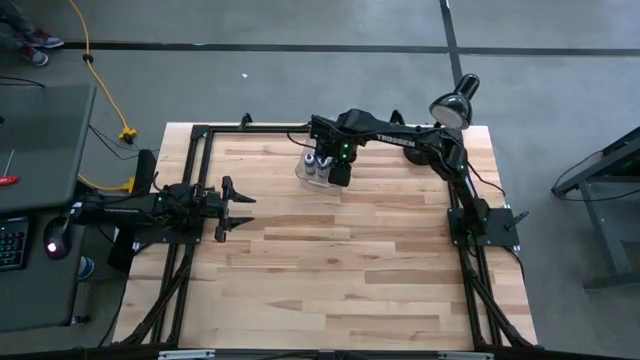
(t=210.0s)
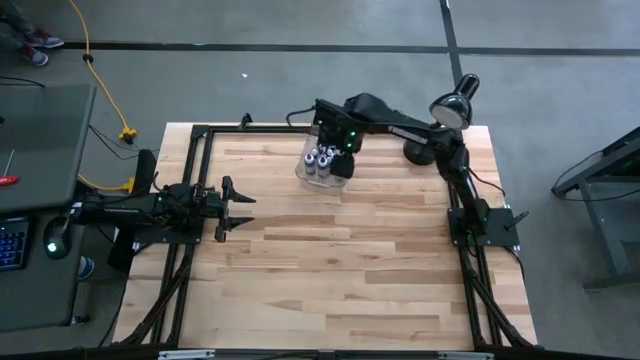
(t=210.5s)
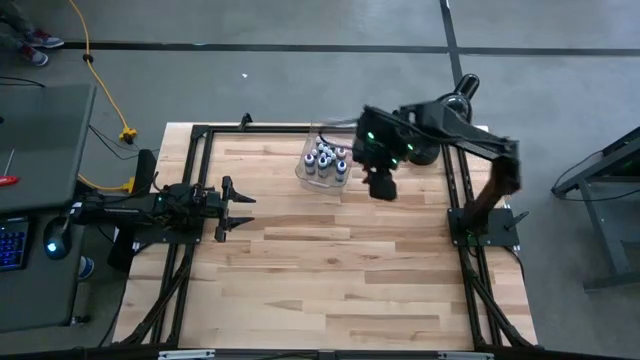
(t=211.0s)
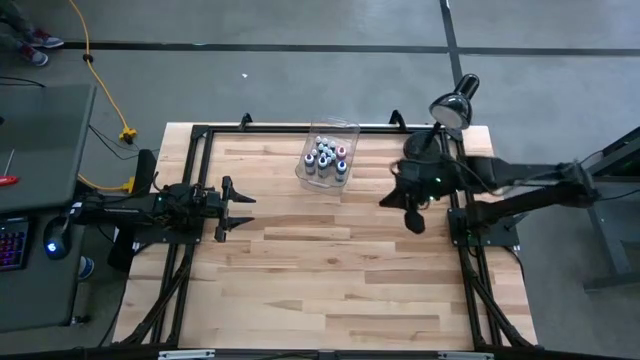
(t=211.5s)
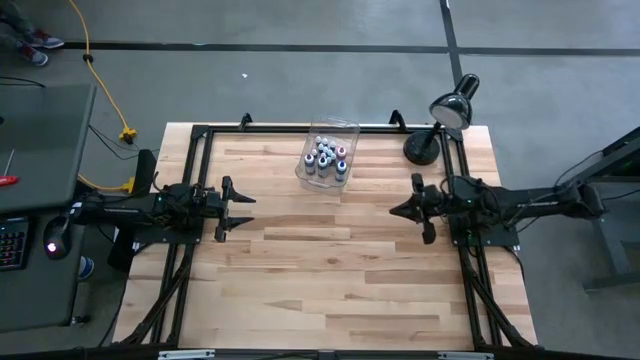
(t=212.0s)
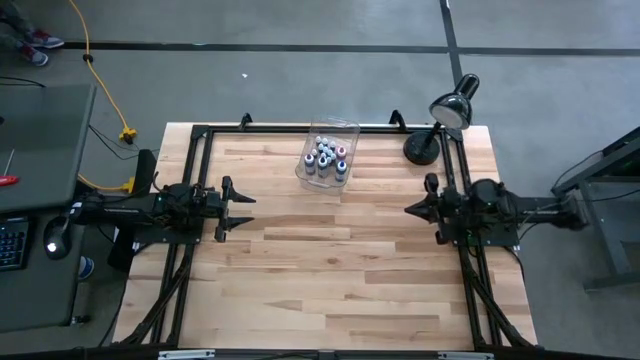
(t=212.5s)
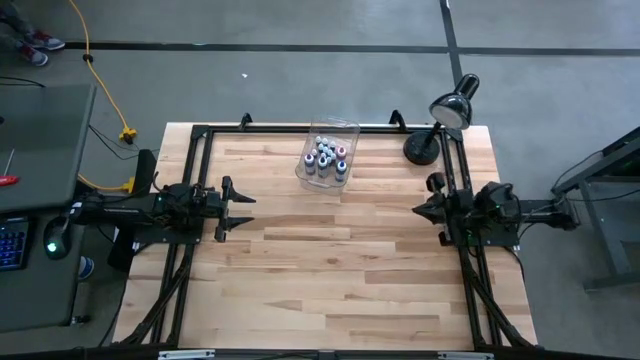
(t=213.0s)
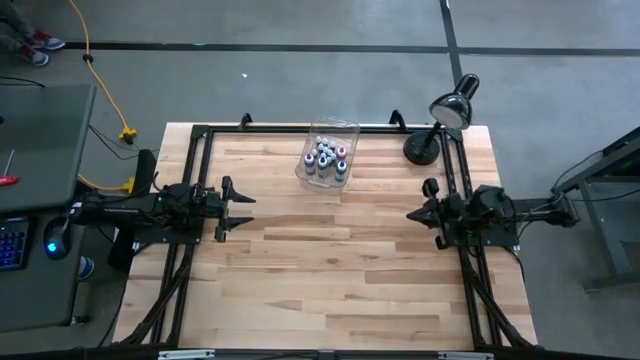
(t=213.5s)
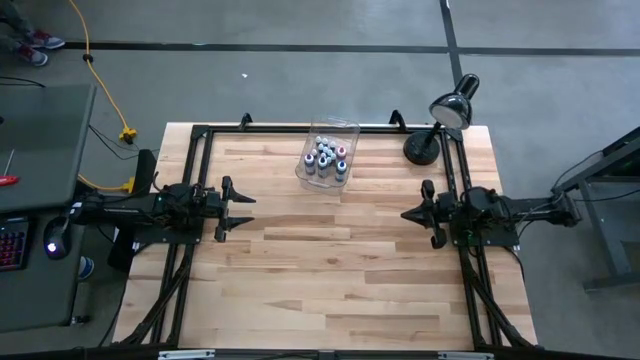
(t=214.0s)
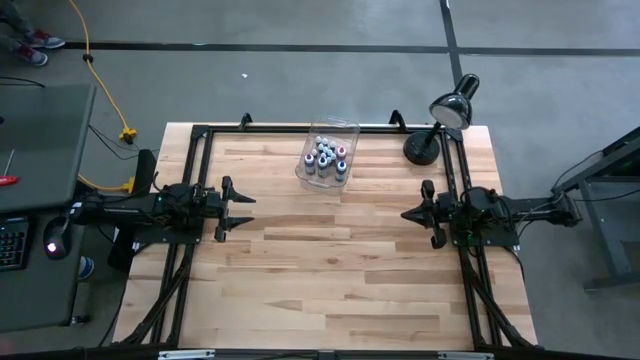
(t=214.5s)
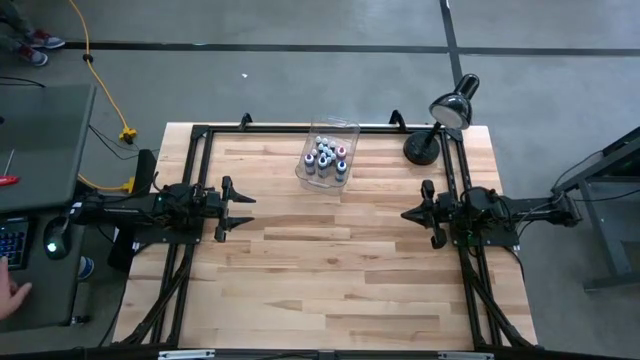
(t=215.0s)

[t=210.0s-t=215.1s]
Task: Pick & Place food coloring
Return to Home Position

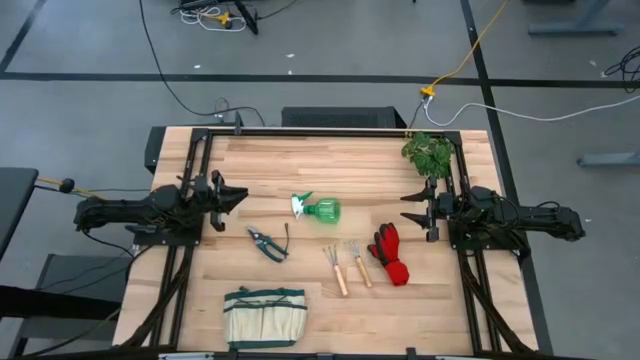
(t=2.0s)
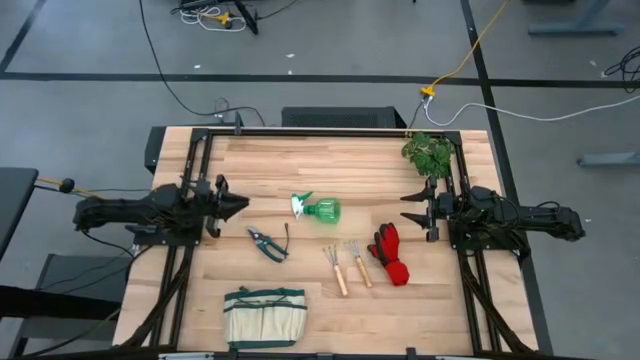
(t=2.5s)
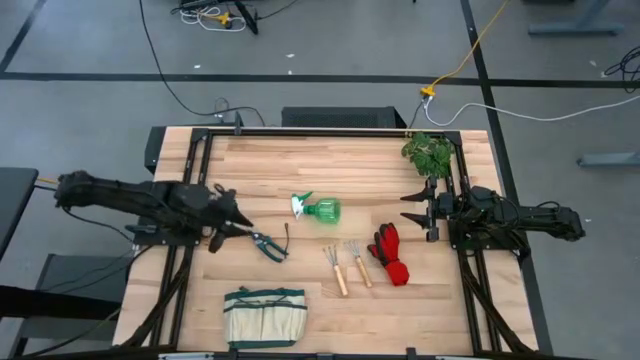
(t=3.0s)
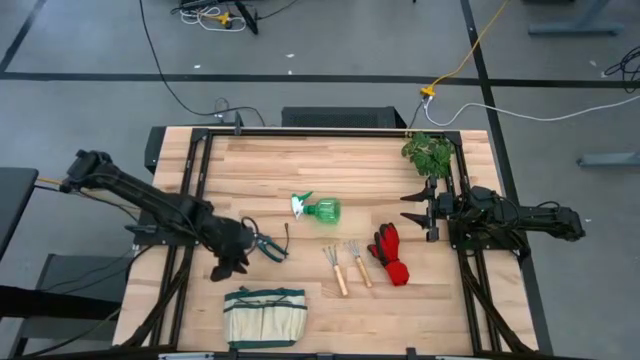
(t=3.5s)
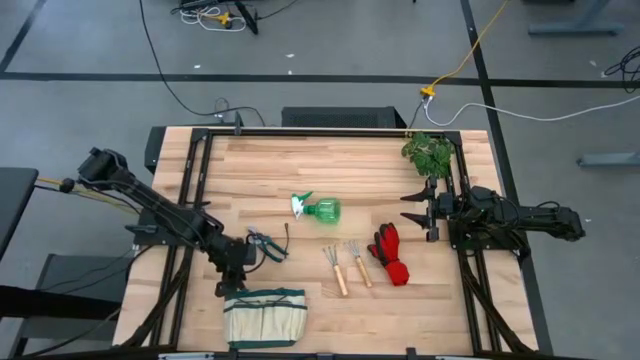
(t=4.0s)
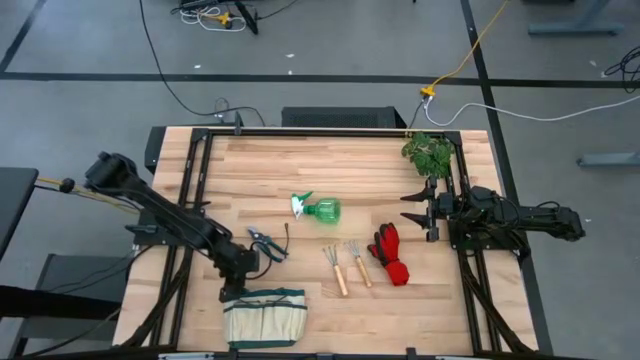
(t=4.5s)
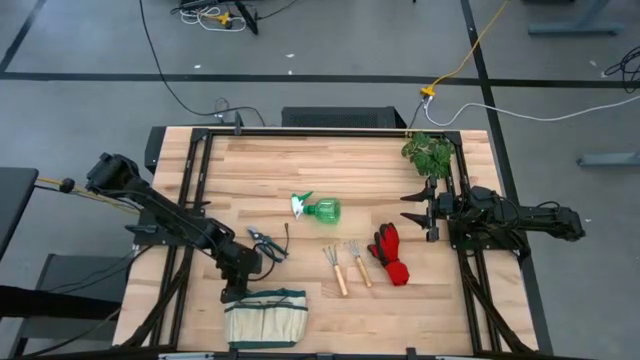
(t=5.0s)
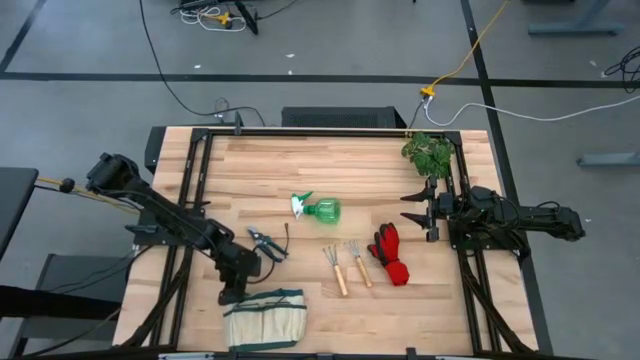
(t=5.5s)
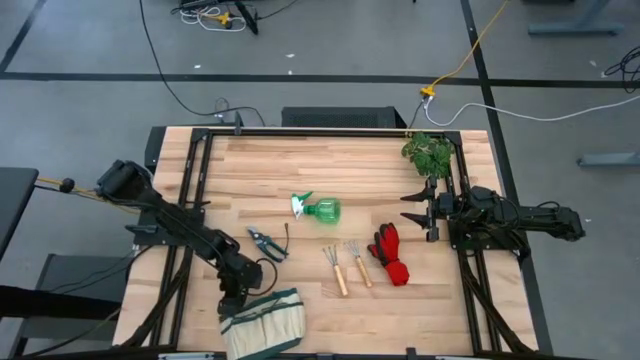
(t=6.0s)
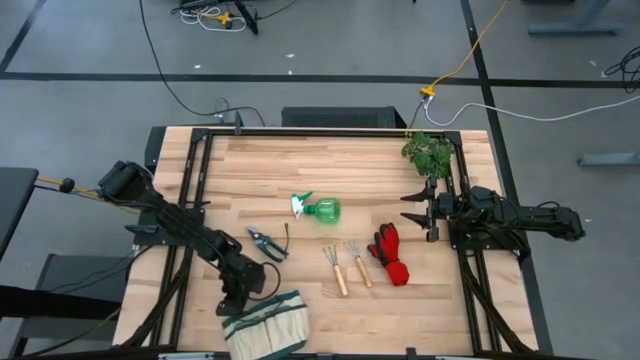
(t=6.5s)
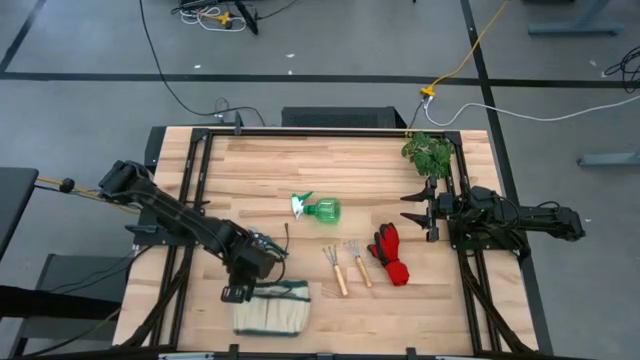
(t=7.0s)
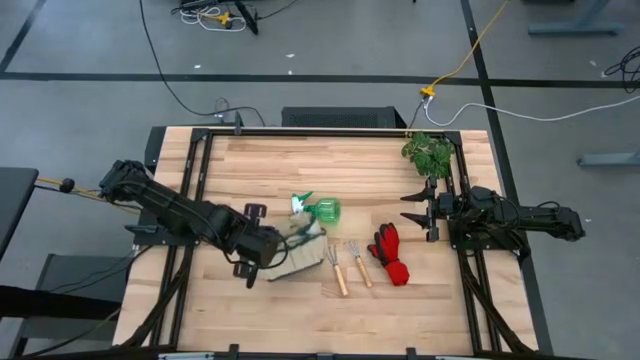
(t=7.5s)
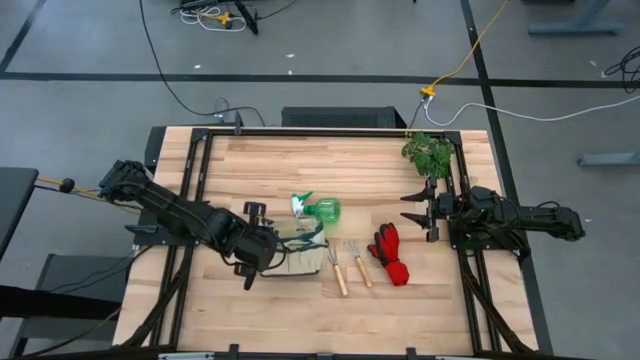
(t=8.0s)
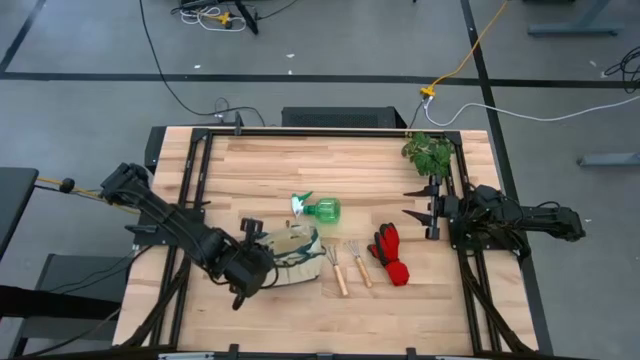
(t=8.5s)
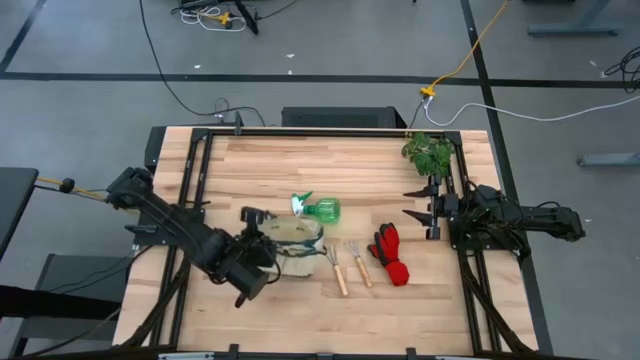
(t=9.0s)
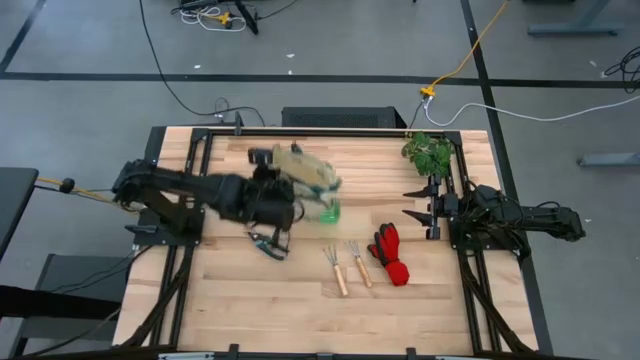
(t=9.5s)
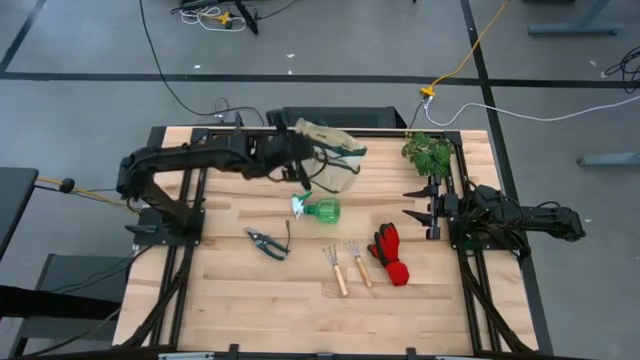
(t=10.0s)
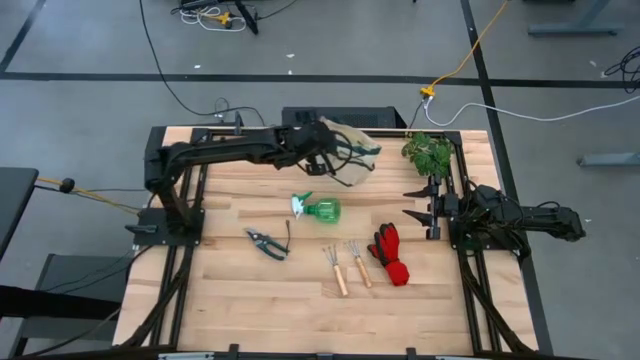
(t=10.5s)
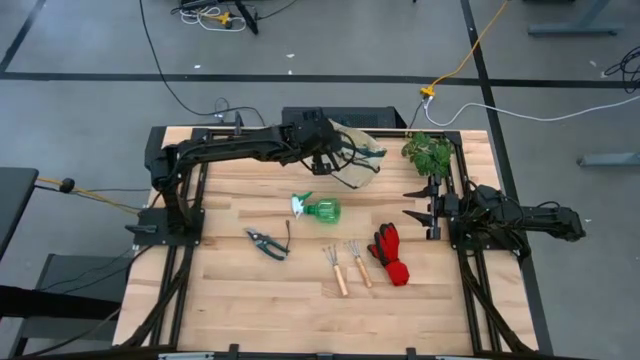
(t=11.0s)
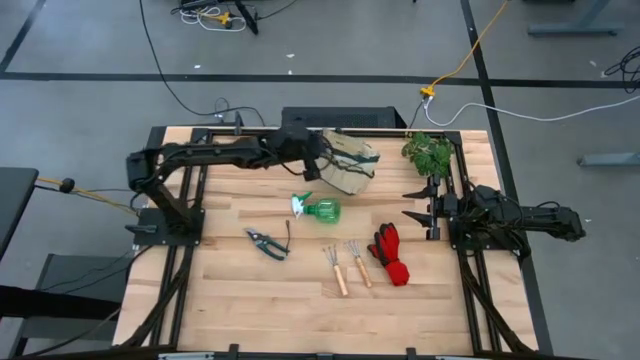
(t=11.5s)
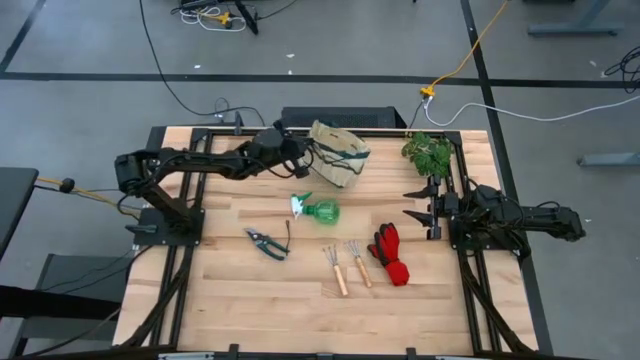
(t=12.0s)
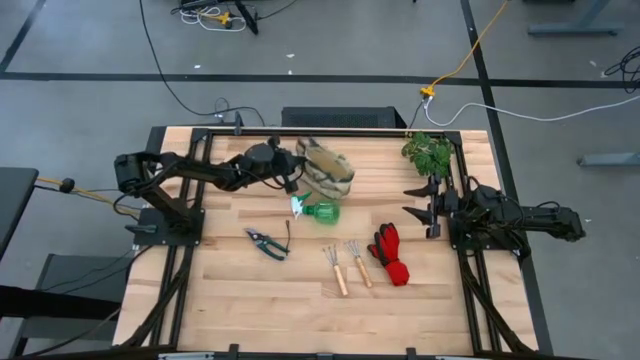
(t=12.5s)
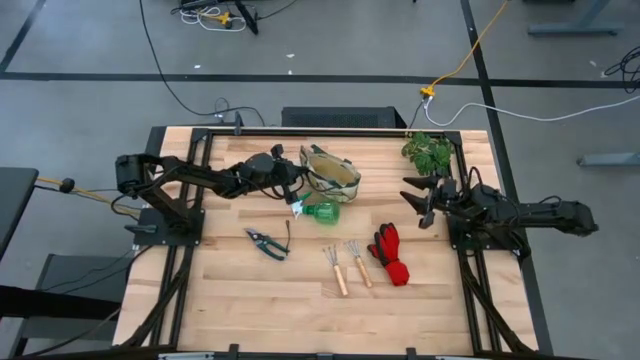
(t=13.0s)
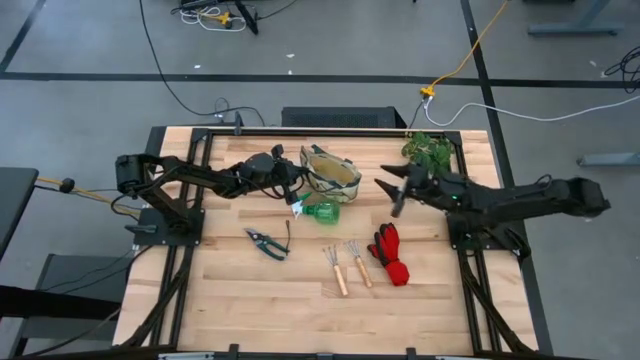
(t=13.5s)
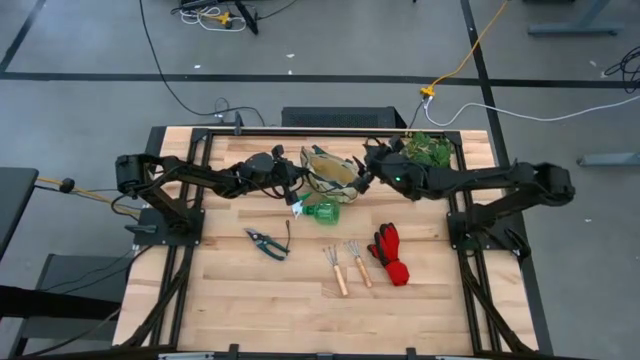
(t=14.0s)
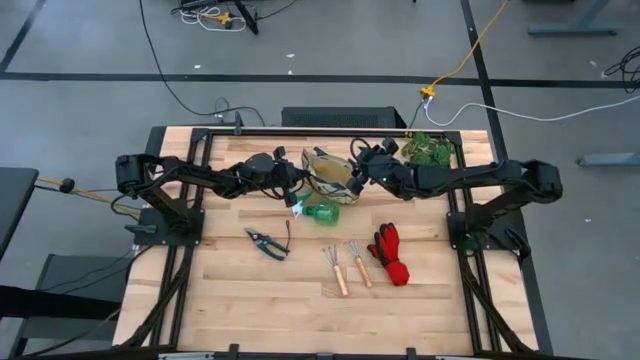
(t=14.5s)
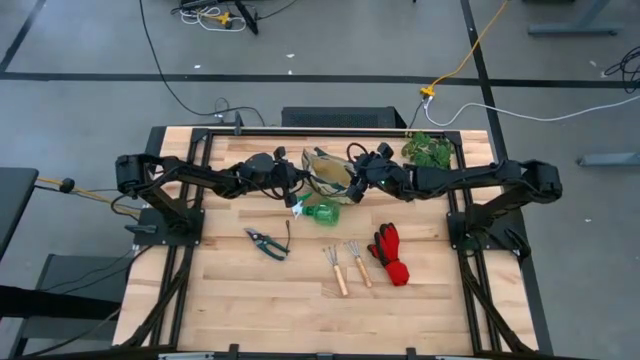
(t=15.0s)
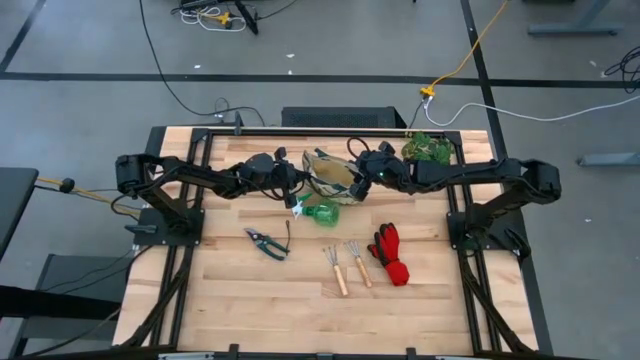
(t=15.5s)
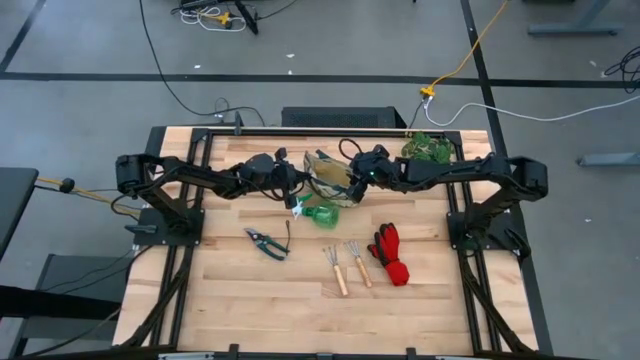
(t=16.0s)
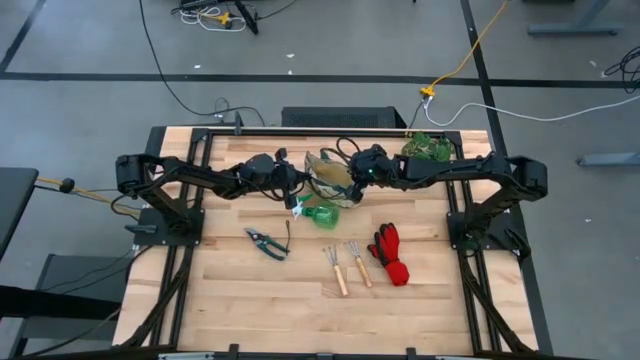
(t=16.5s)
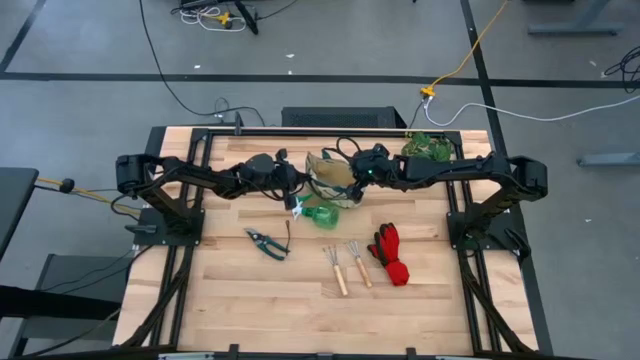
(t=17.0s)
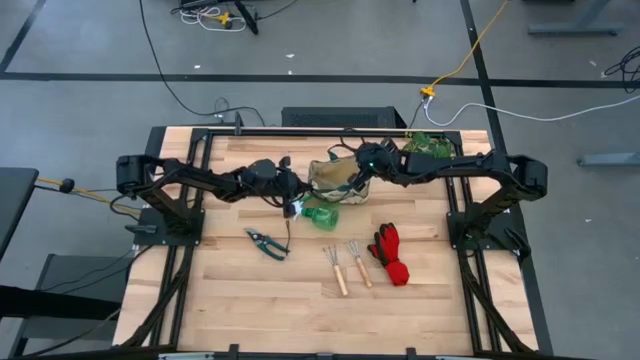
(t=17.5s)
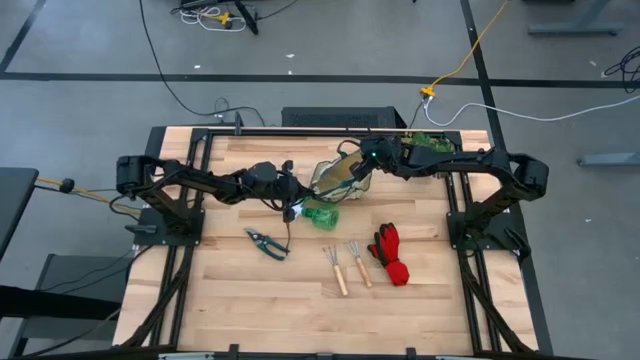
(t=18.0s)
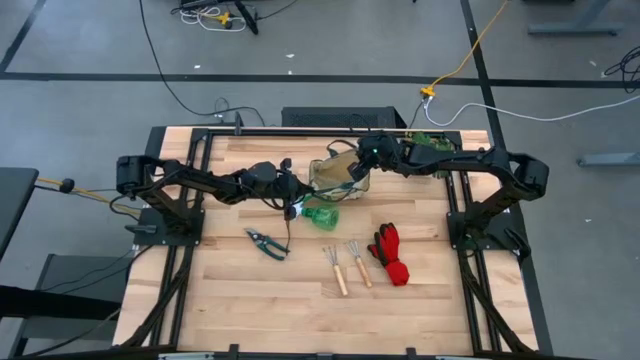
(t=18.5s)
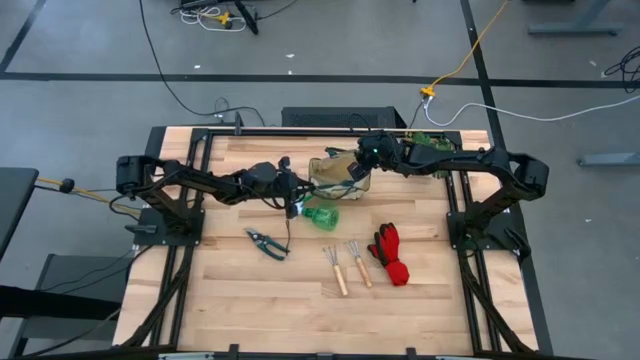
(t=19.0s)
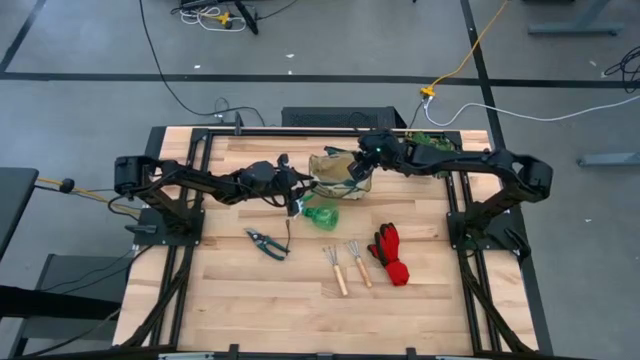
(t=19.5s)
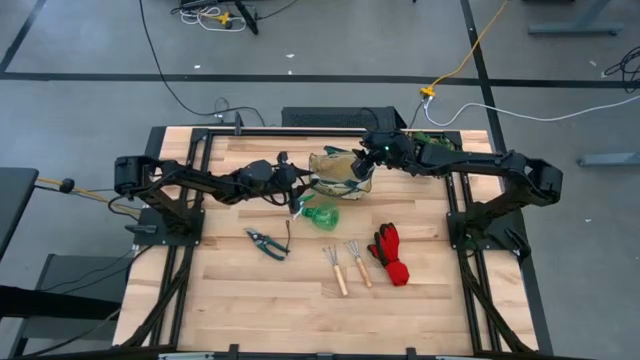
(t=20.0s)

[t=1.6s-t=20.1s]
Task: Pick & Place Garden tools in Gardening bag
Move the tool bag on the top center
